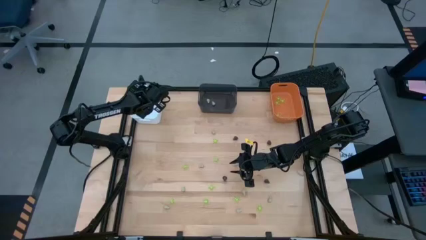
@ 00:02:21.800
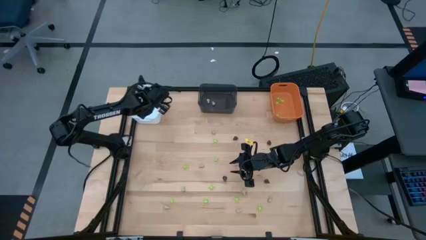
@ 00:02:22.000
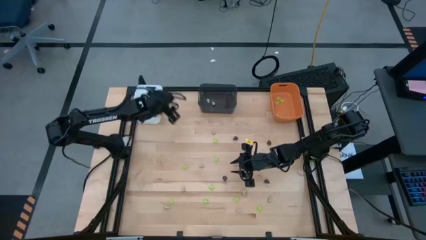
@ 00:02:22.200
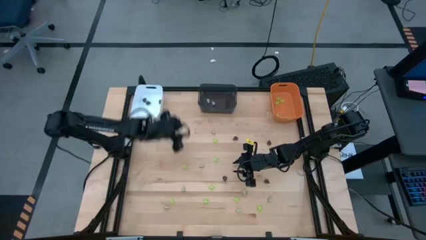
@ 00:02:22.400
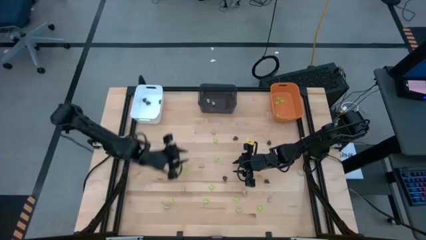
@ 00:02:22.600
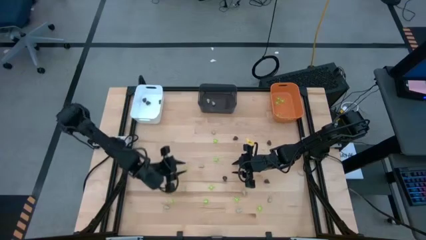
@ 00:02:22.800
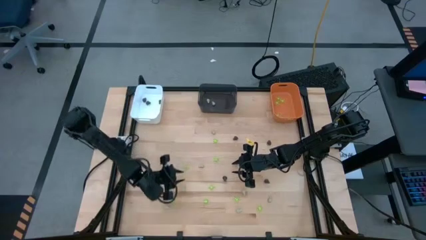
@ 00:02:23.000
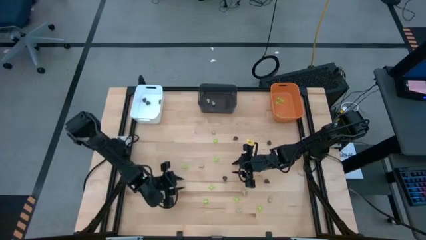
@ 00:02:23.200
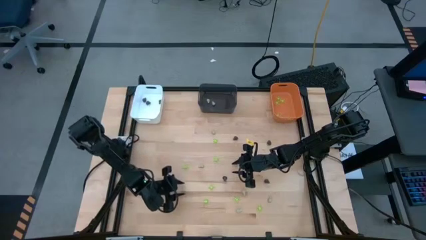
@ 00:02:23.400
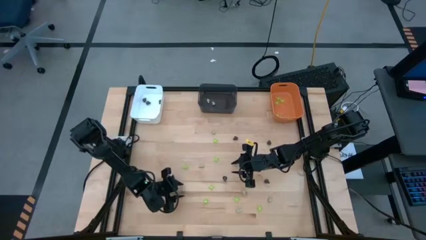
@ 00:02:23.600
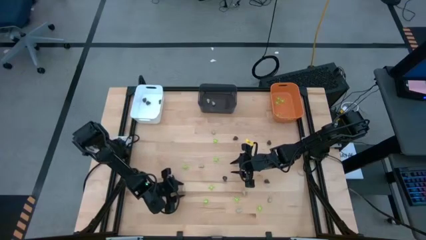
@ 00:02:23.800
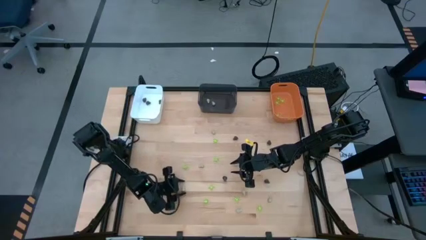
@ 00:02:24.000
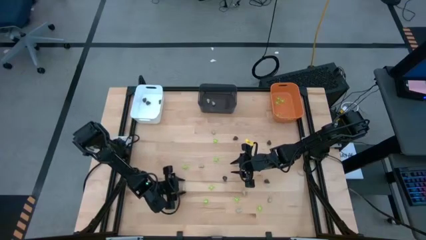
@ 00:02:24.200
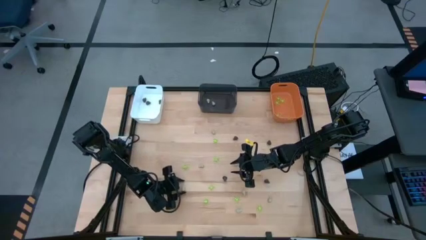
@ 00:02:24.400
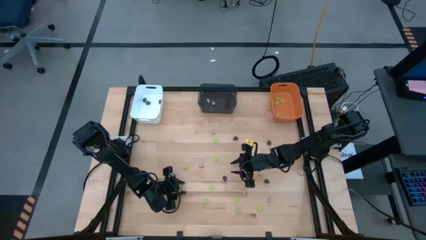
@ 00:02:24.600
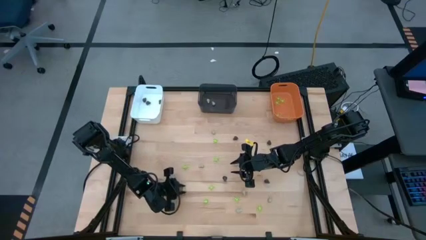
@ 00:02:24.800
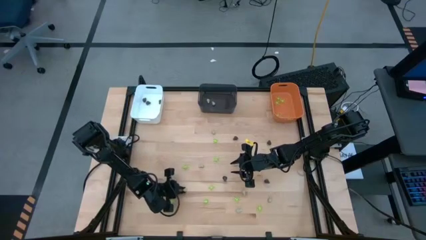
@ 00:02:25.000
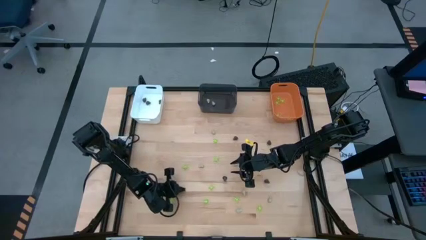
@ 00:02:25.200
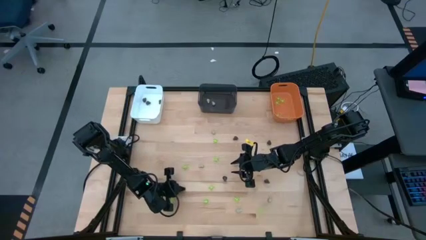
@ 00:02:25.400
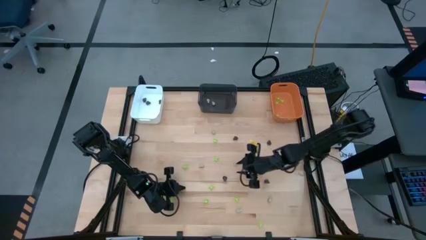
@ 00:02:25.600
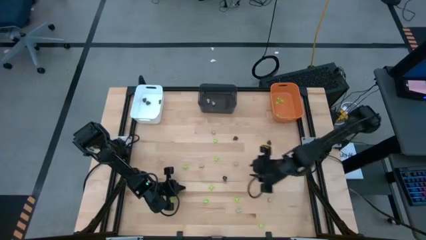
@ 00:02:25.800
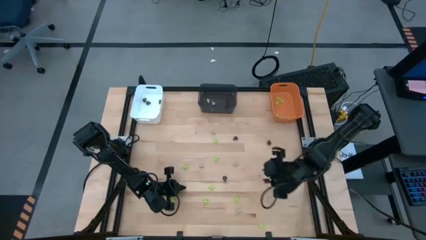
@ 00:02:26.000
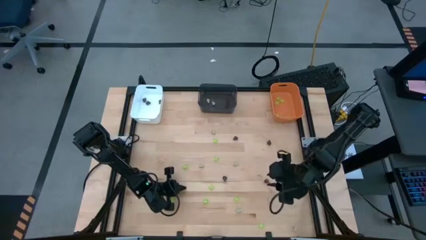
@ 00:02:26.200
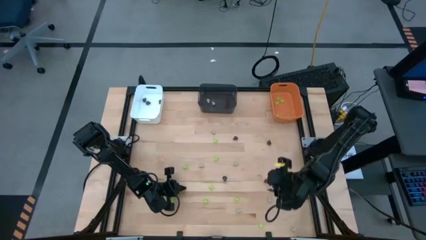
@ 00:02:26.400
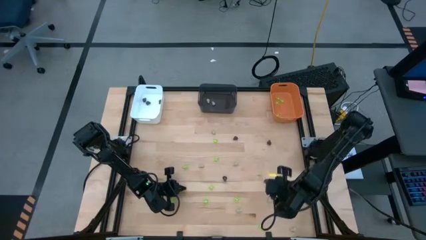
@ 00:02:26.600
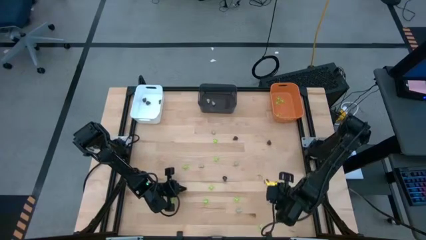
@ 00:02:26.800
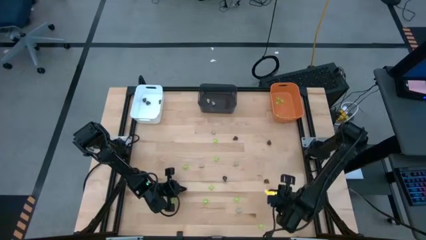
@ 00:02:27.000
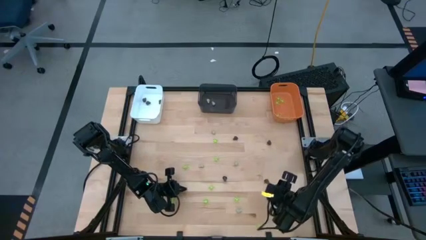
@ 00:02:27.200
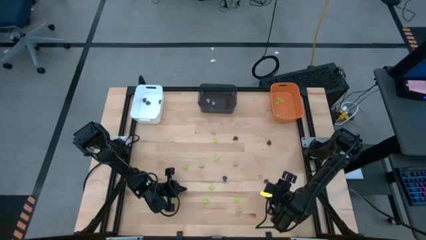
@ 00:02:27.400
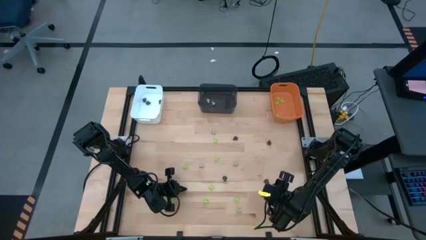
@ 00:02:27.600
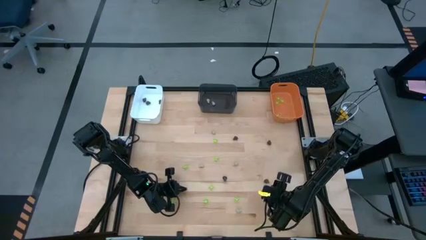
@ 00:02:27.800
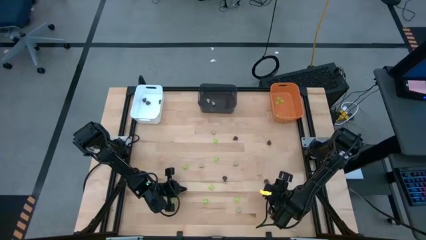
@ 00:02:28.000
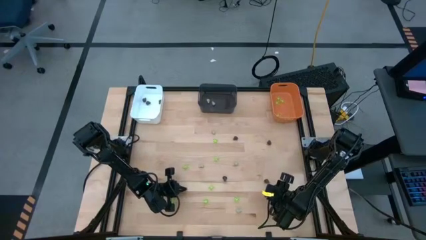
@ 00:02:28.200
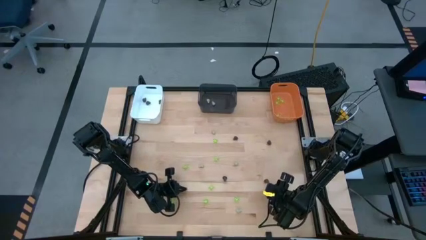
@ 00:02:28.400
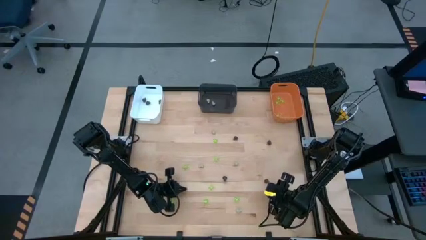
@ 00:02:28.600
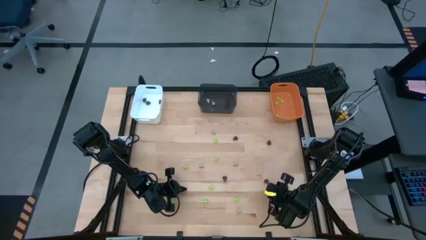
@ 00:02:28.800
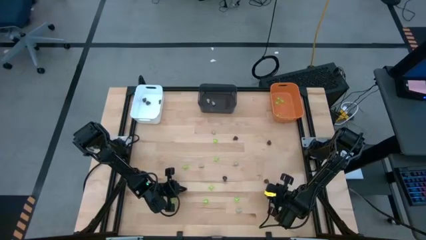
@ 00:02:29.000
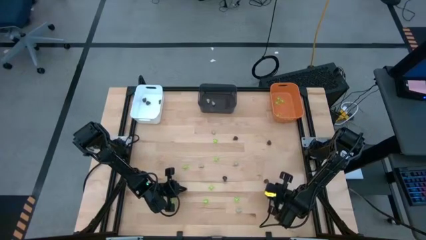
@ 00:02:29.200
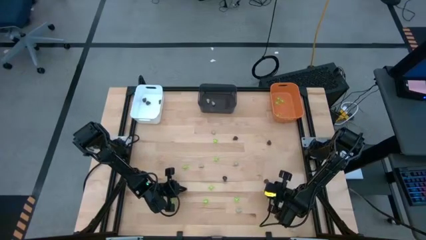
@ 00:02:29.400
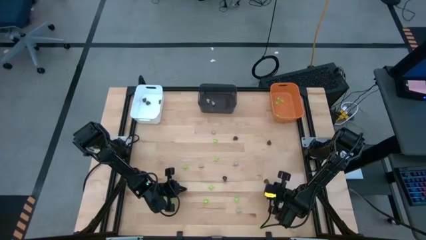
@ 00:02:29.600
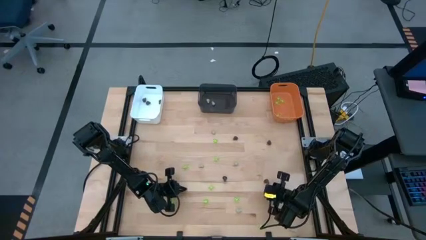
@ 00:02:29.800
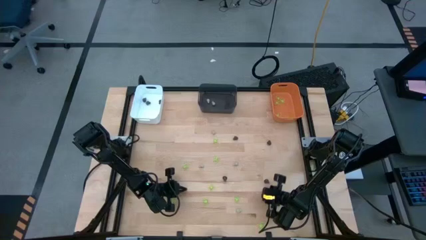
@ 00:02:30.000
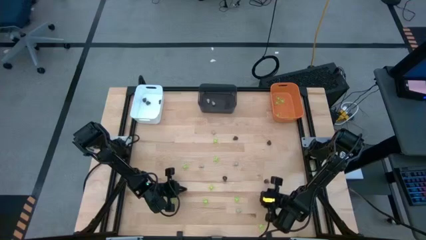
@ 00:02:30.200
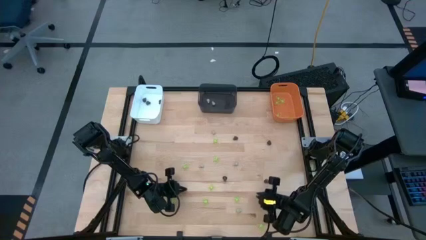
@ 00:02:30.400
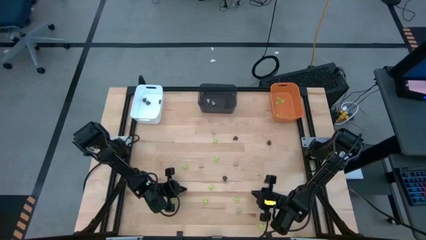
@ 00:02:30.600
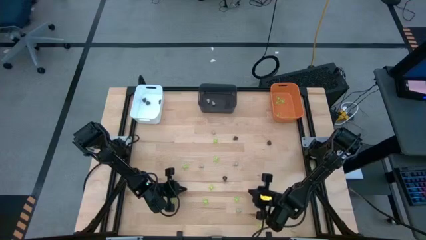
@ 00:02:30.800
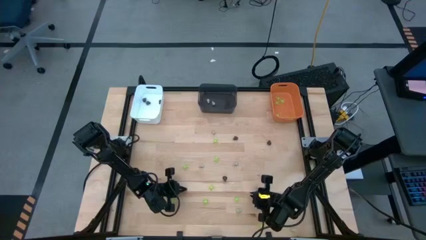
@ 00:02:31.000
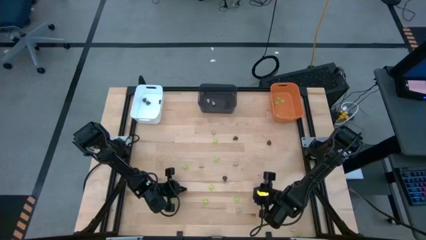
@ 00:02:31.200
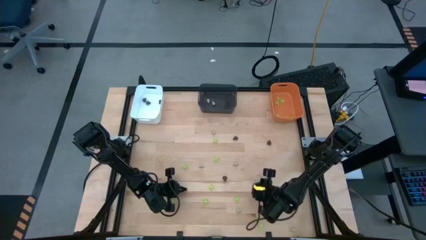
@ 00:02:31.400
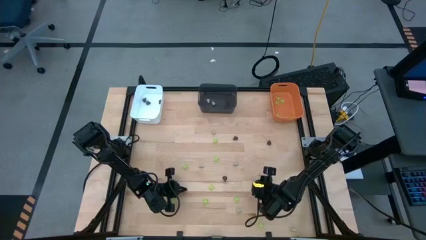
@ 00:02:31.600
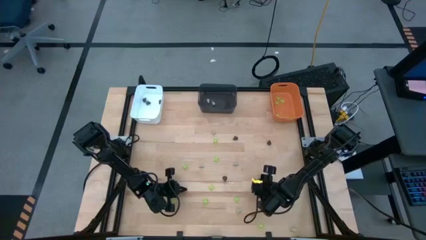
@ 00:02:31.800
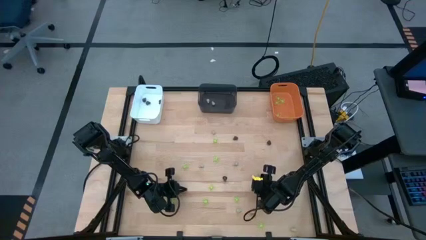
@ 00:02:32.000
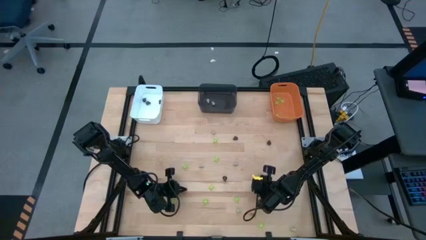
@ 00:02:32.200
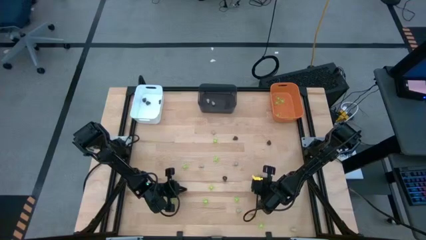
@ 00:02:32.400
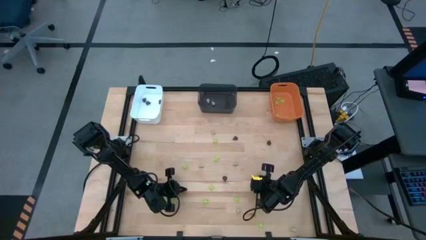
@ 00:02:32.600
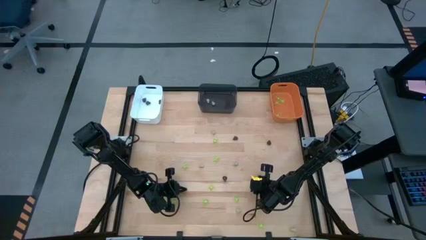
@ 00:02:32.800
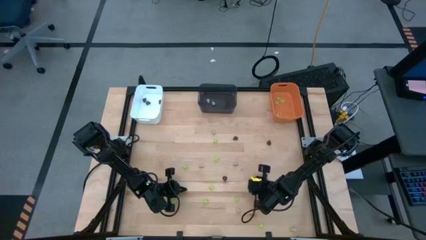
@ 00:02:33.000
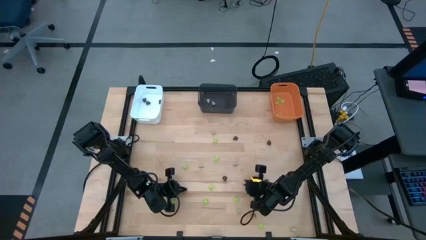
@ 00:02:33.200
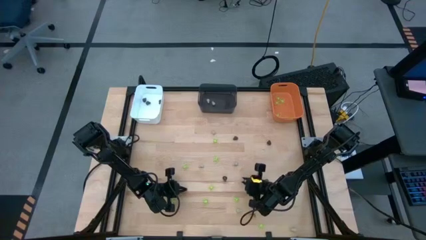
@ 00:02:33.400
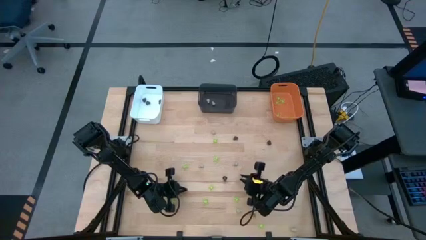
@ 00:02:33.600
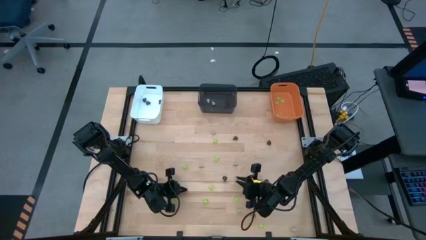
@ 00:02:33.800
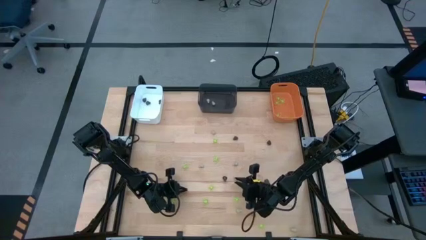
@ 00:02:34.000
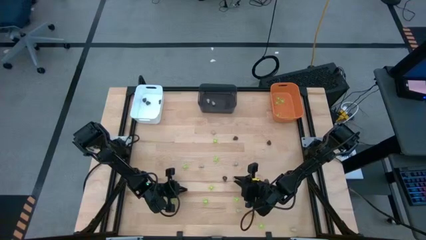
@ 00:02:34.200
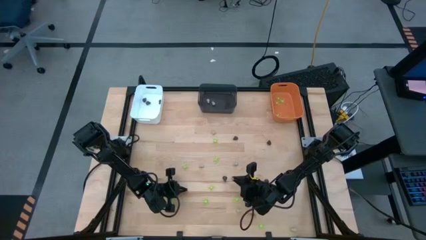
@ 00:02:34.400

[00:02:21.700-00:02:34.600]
Task: Sort Halloween decoration
Put the white toy skull into the black bin

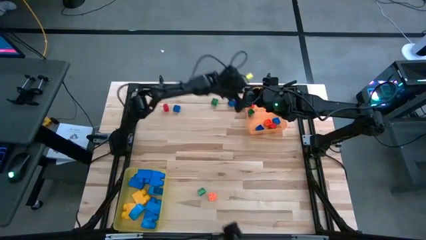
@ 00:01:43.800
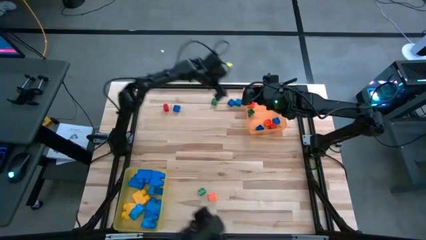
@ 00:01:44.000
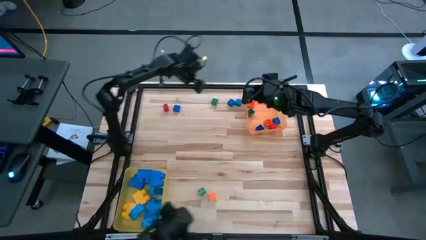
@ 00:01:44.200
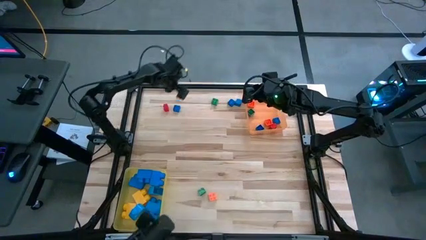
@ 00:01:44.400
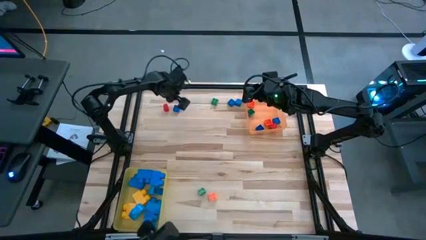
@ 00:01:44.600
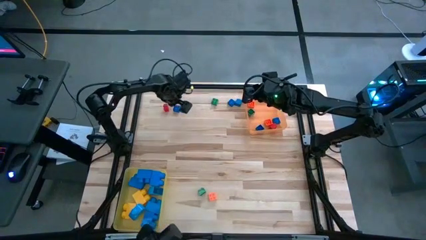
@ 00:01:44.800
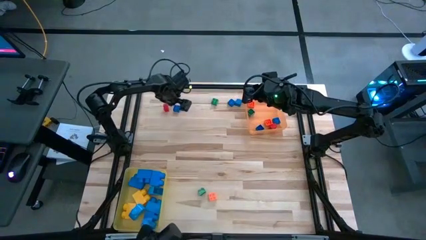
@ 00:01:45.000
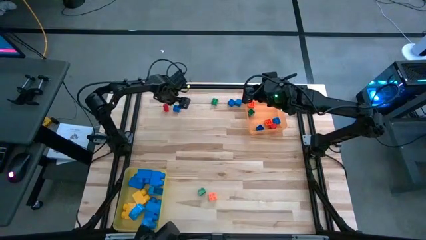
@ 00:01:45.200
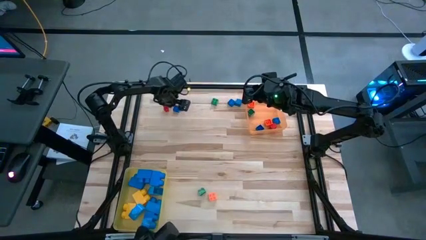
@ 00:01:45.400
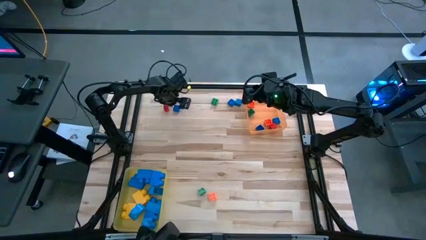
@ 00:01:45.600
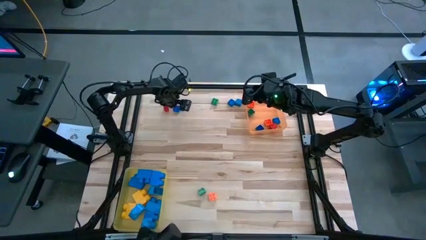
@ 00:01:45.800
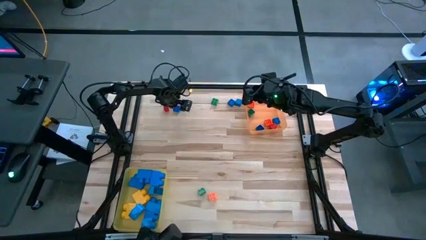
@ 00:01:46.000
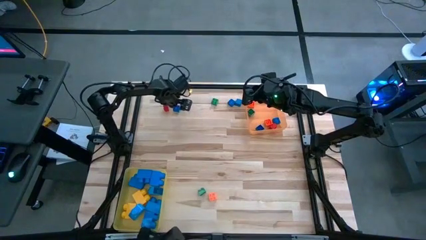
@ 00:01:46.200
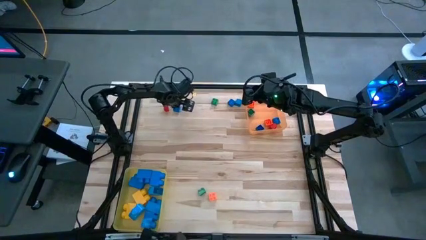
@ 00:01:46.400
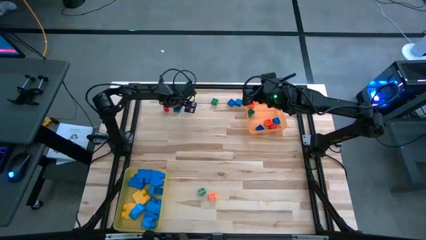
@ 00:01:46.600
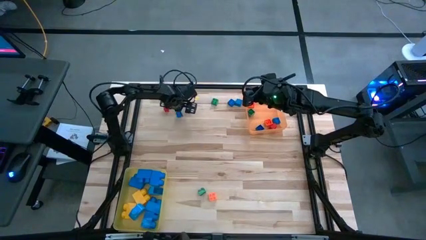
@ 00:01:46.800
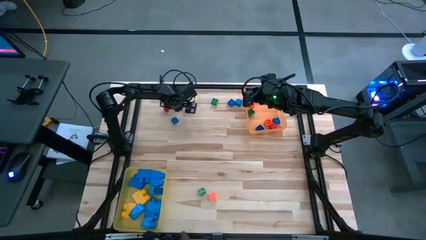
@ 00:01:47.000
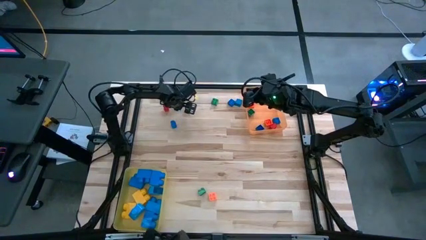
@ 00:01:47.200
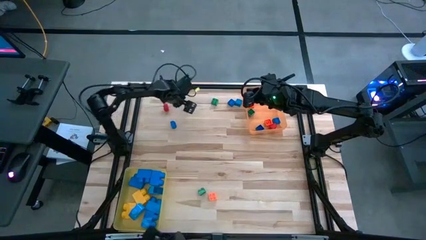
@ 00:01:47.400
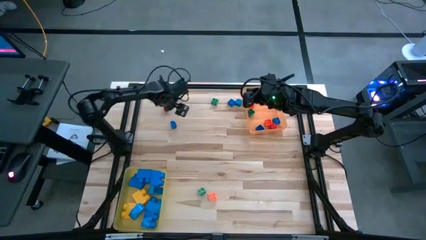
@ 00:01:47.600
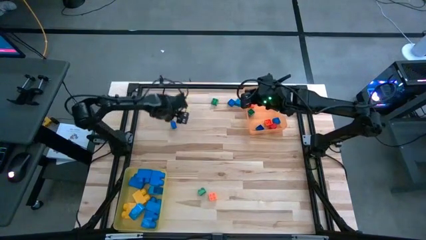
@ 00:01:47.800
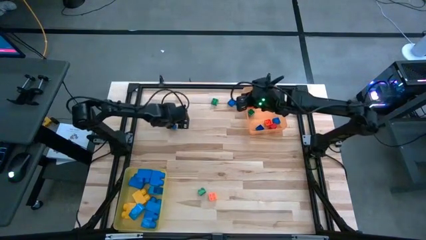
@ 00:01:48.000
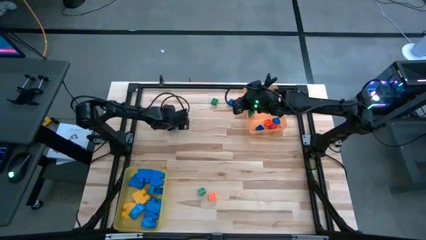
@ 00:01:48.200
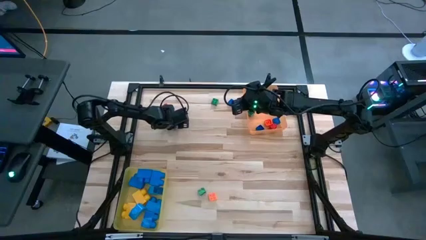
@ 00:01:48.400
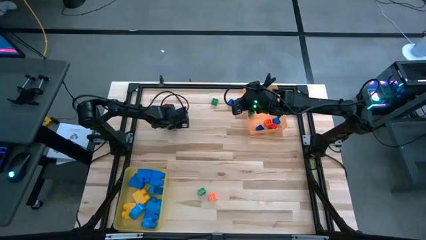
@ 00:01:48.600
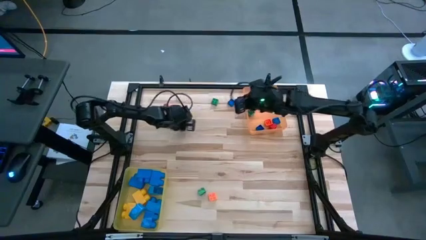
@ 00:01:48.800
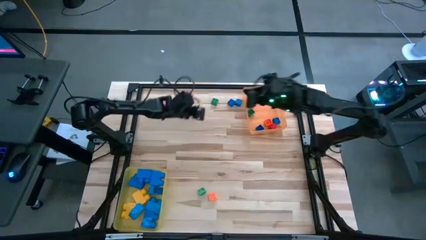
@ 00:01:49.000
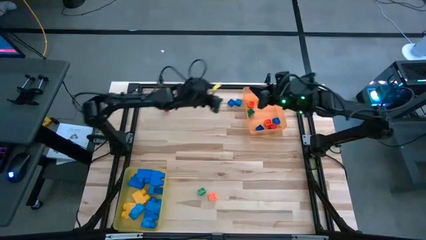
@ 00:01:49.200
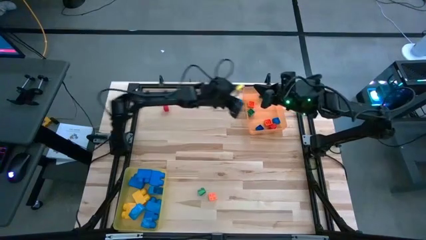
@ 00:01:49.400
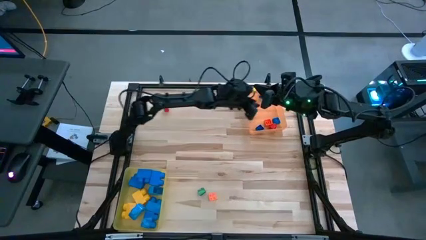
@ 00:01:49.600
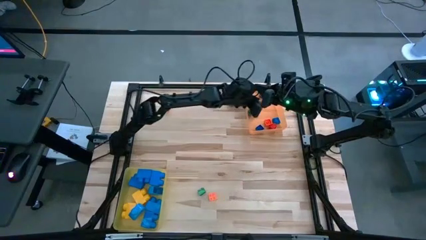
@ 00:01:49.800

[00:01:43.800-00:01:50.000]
Task: Sort blocks by size
Put the small blue game piece into the orange bin
